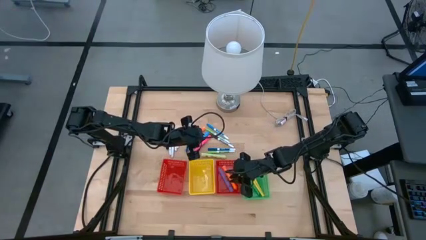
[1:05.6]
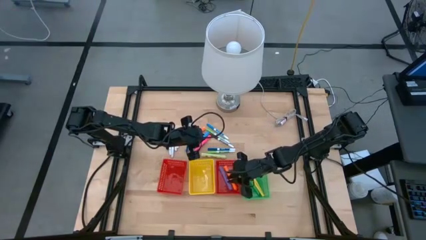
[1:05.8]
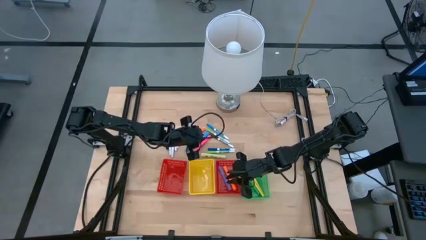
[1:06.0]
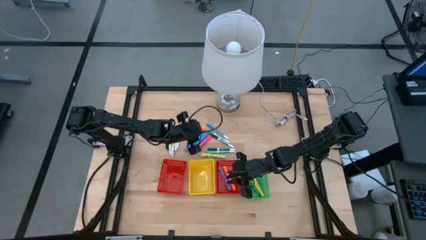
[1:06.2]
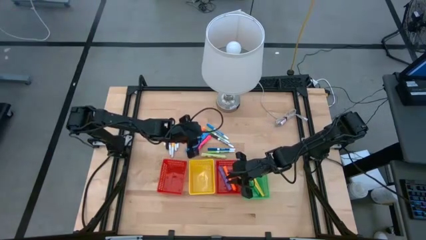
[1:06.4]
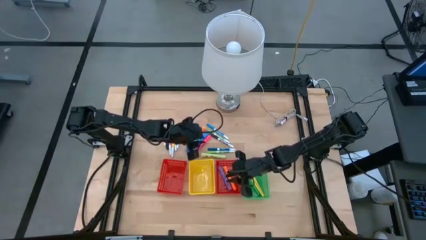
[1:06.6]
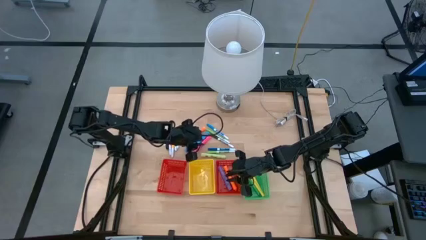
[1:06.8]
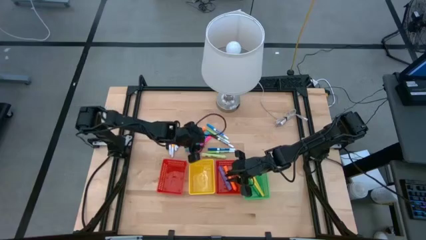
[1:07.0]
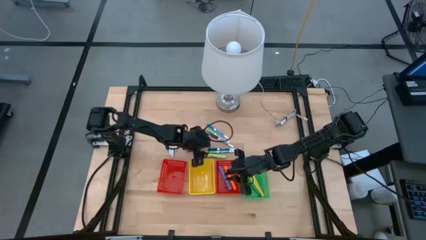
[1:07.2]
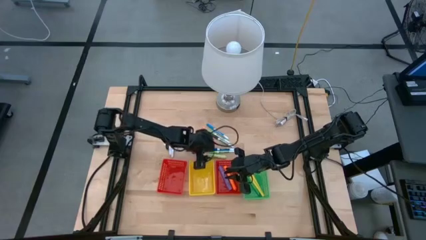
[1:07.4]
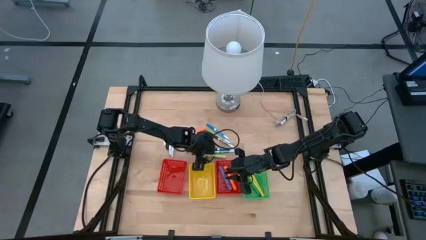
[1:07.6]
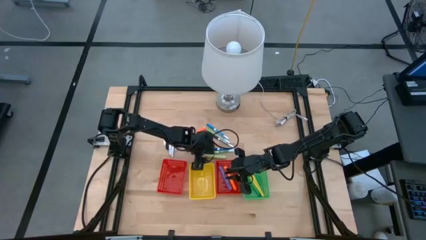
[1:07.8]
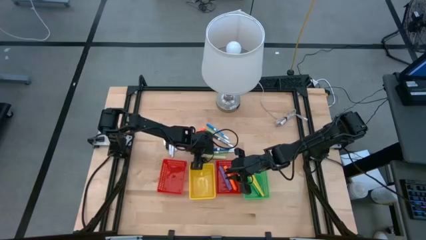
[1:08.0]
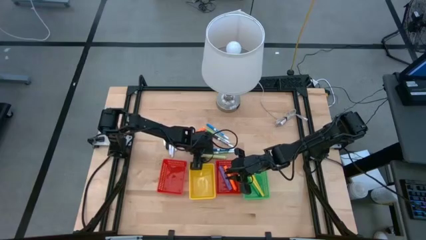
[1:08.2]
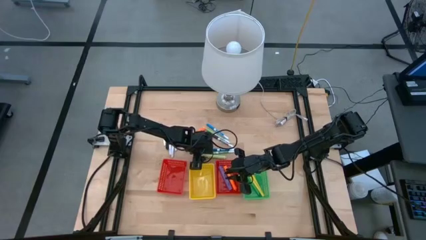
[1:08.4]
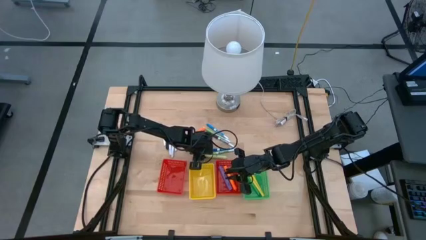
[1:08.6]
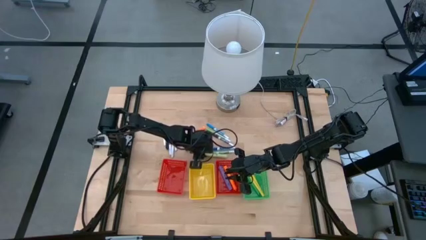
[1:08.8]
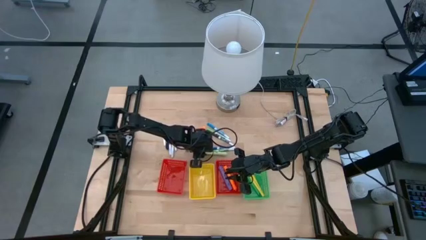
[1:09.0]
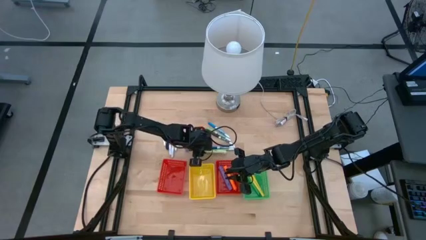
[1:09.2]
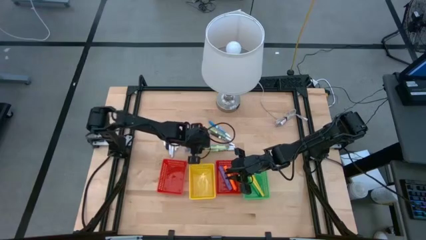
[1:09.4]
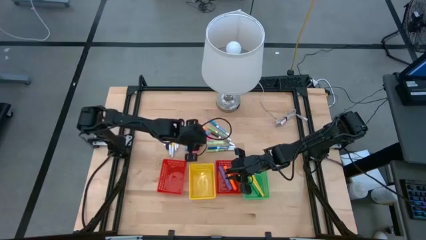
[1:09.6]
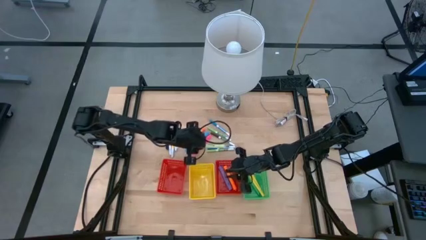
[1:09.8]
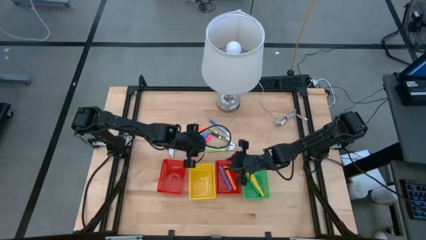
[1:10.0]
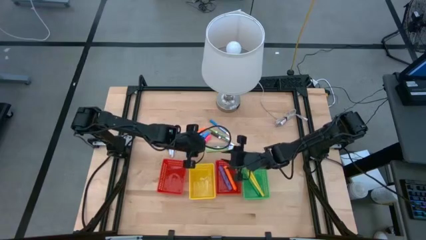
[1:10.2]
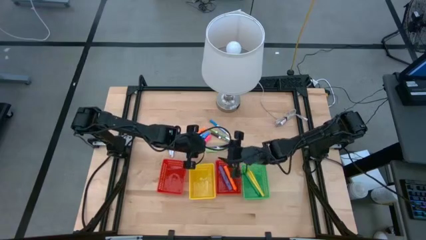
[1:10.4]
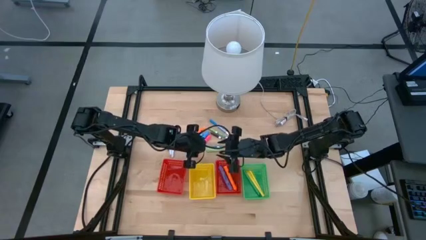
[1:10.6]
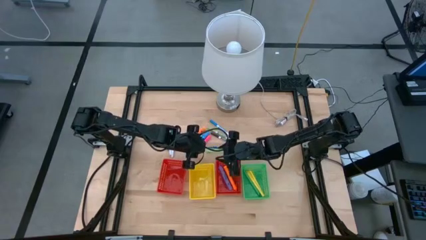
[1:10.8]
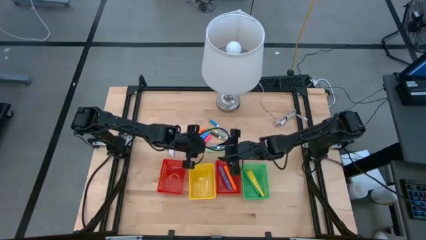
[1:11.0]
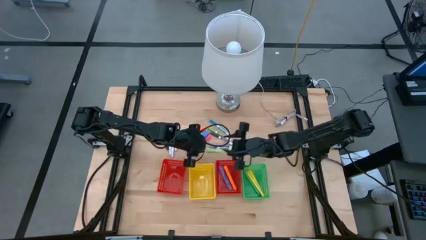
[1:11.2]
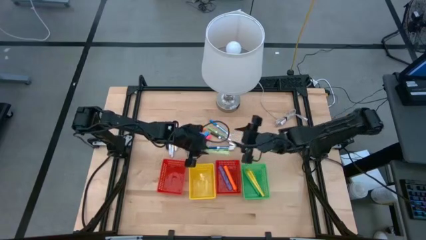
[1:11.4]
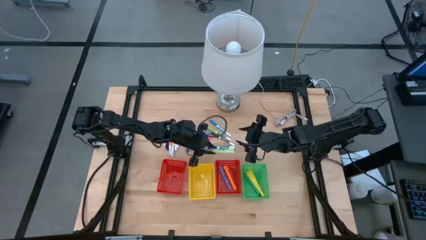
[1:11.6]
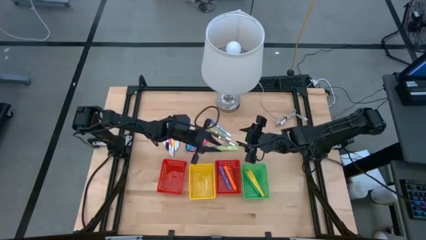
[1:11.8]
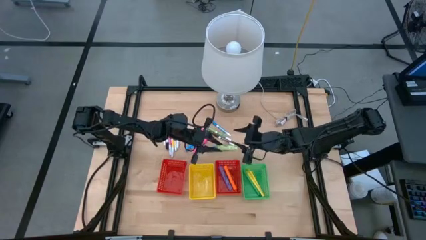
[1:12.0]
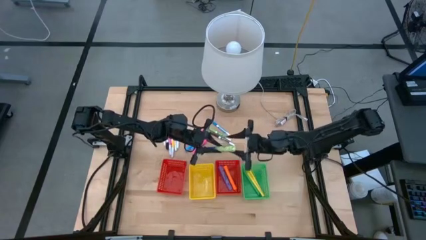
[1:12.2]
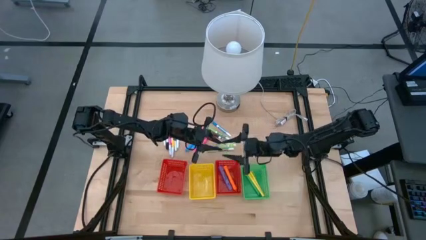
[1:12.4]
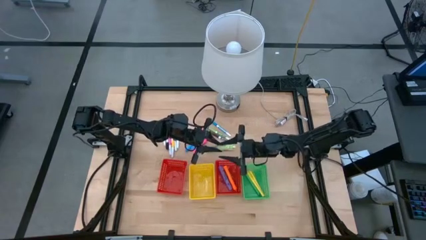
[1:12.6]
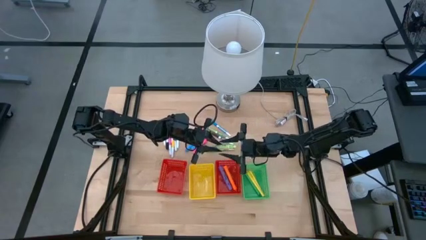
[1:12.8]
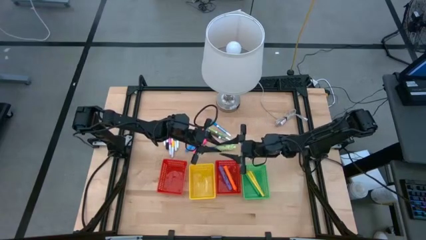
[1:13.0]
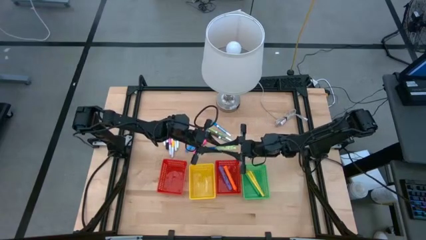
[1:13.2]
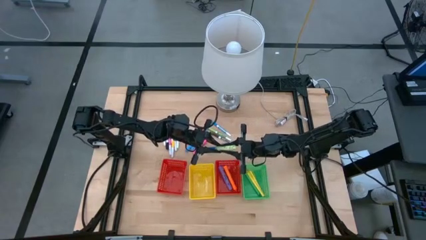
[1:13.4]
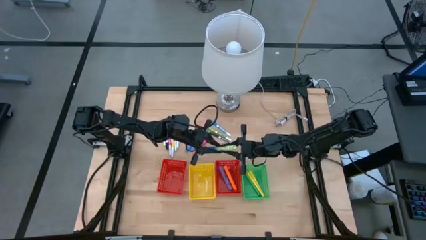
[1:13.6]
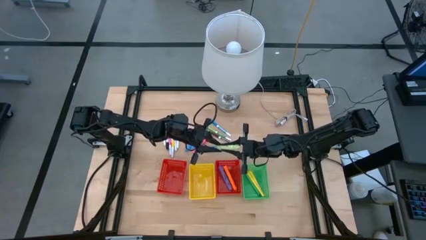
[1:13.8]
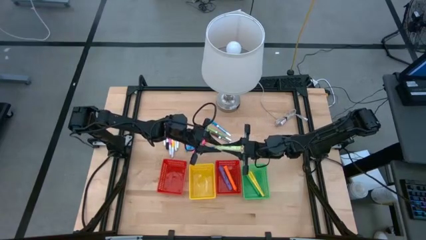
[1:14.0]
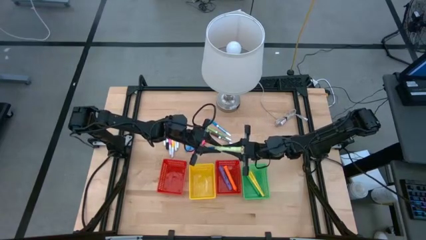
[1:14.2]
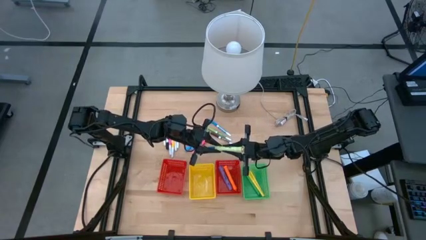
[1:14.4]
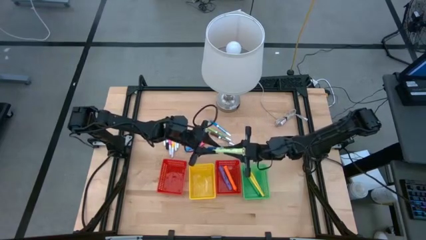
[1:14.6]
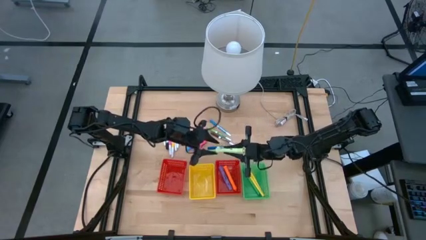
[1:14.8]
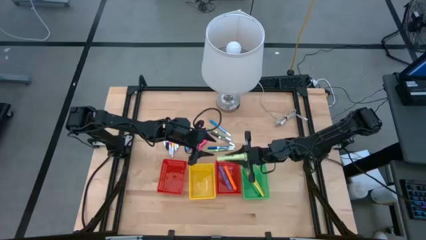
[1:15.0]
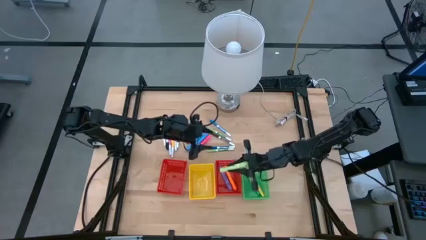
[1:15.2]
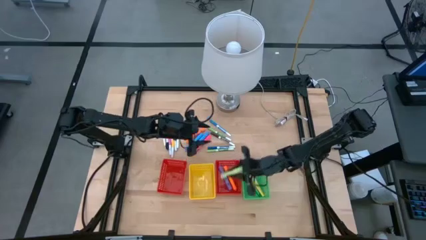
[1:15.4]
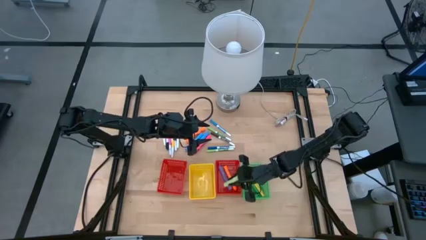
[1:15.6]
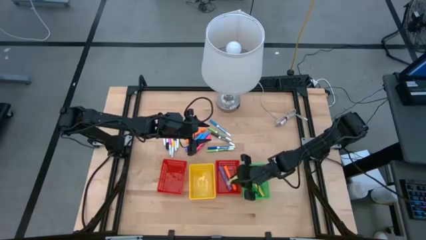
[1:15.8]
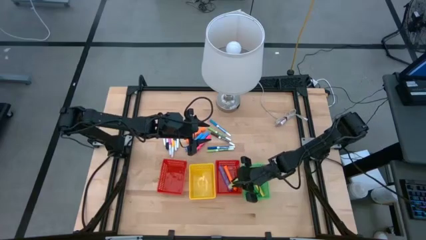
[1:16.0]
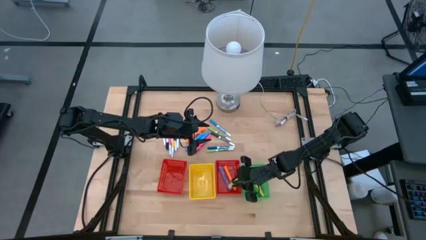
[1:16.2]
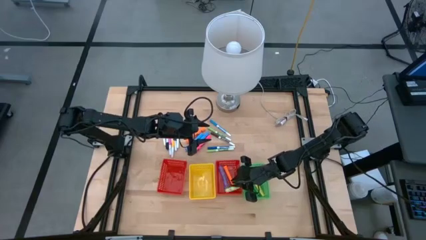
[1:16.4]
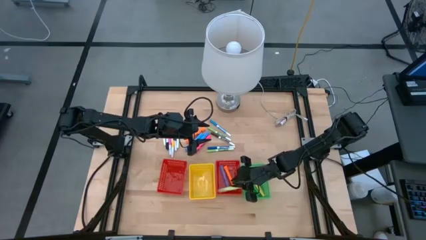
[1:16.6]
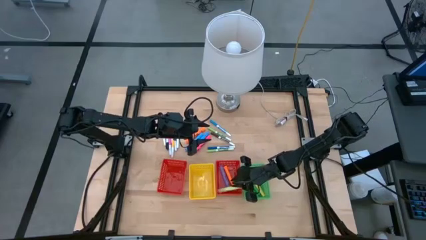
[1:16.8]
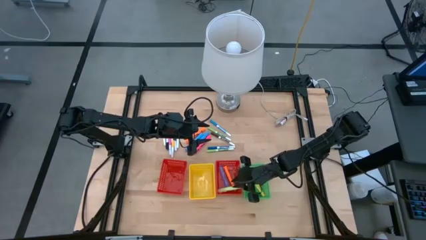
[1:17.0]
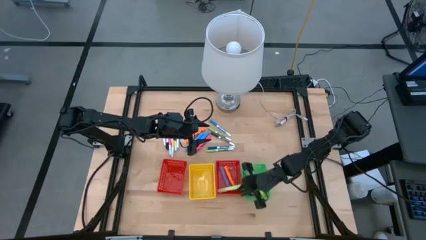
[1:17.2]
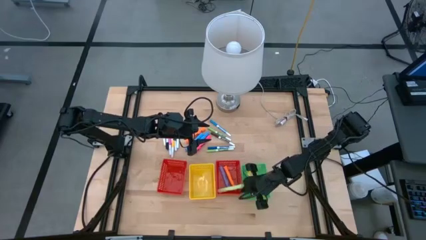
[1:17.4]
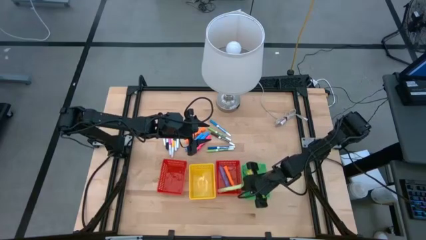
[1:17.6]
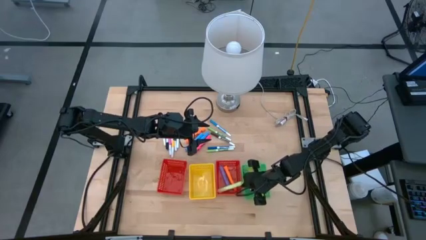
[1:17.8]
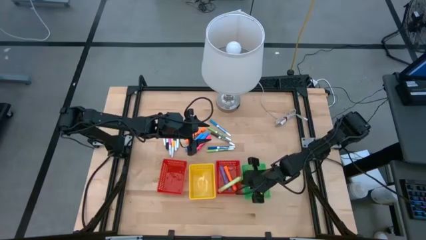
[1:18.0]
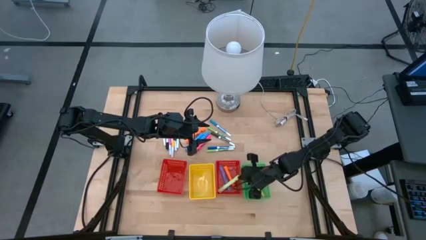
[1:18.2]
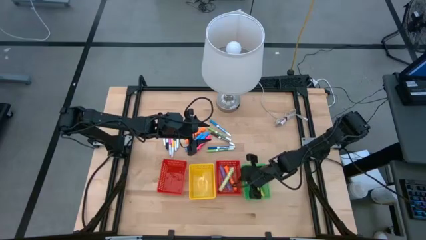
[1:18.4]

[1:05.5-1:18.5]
Task: Pick & Place Markers
Put the large green highlighter into the right red bin
